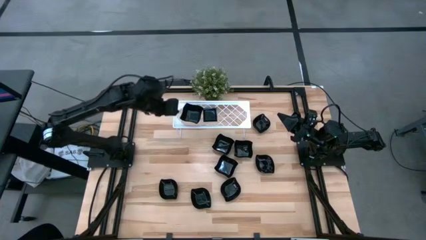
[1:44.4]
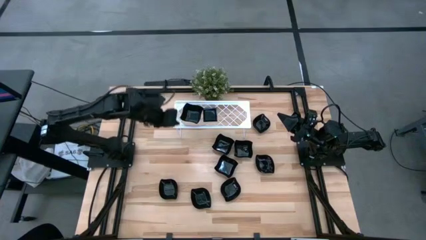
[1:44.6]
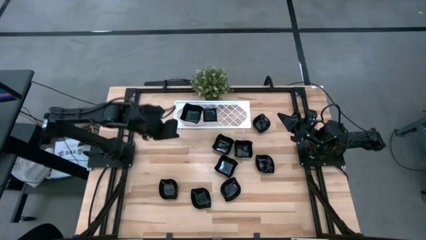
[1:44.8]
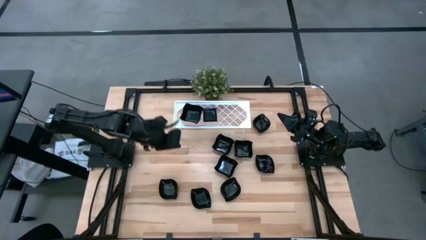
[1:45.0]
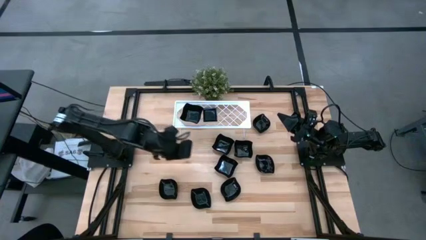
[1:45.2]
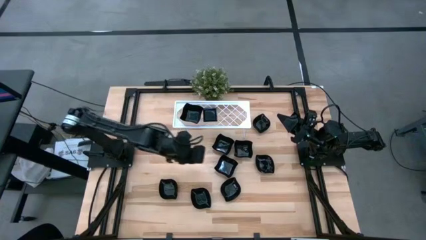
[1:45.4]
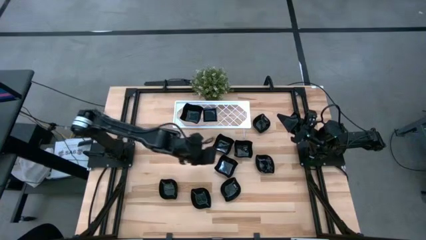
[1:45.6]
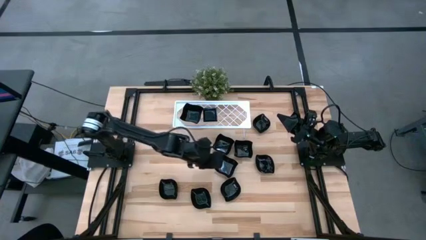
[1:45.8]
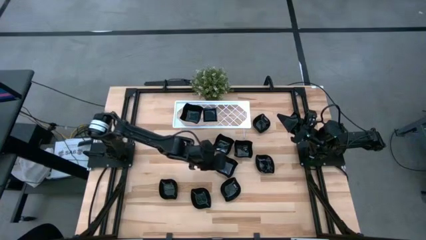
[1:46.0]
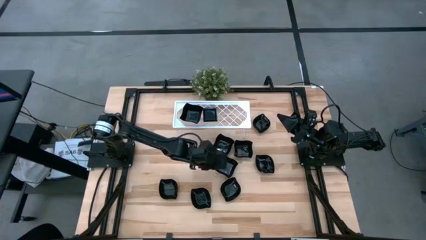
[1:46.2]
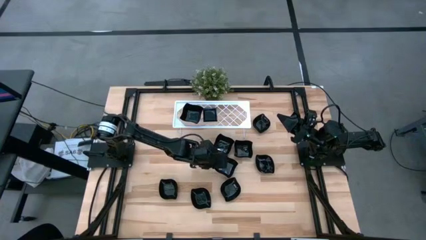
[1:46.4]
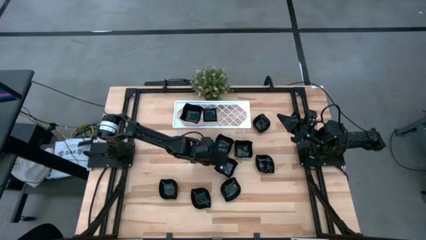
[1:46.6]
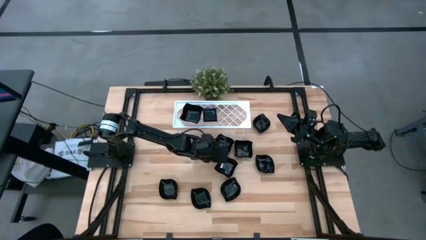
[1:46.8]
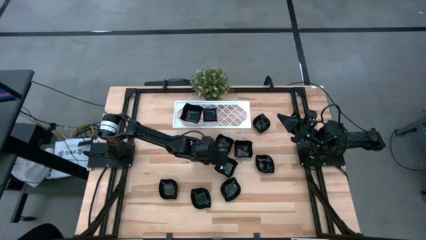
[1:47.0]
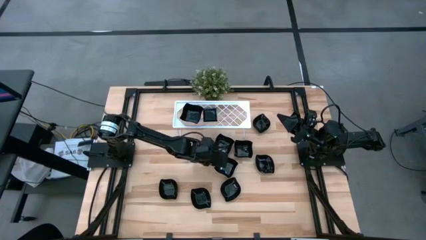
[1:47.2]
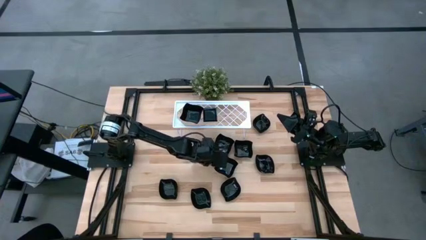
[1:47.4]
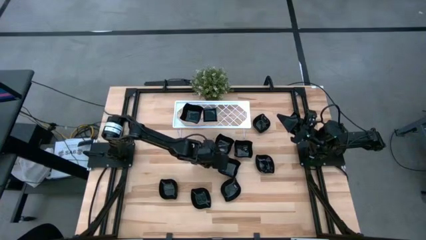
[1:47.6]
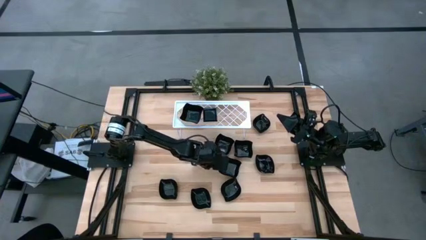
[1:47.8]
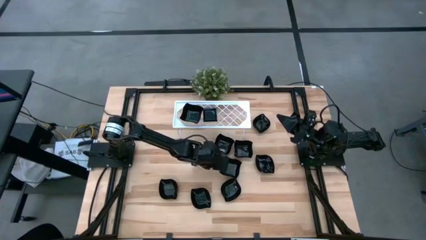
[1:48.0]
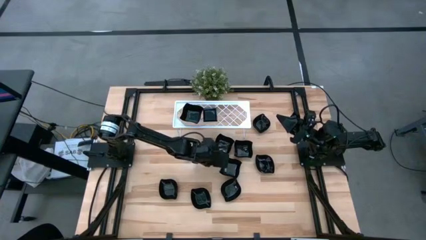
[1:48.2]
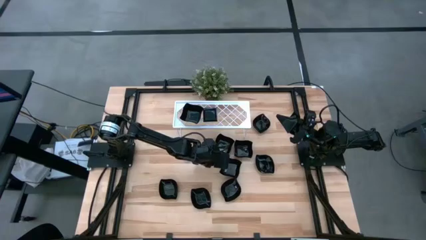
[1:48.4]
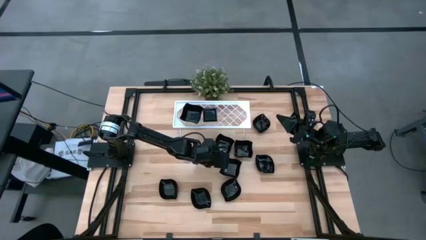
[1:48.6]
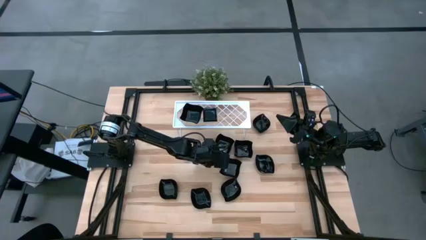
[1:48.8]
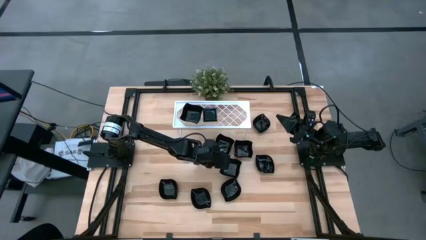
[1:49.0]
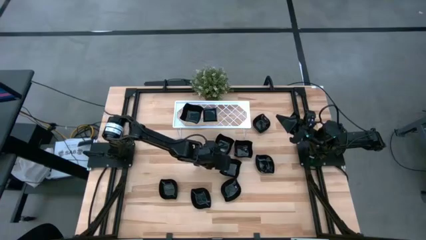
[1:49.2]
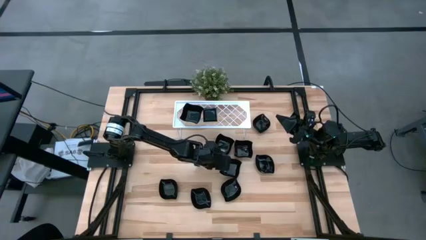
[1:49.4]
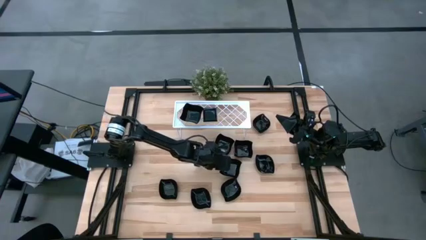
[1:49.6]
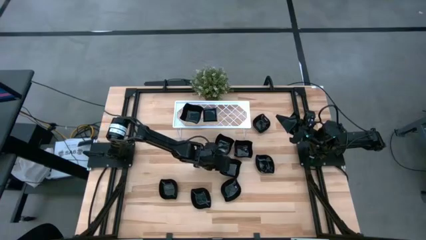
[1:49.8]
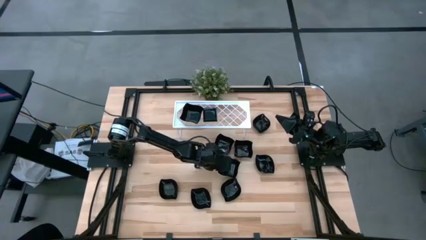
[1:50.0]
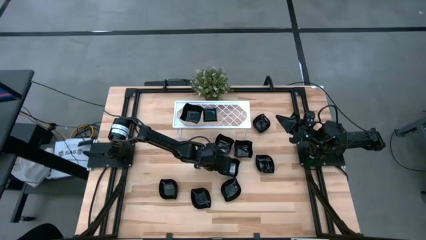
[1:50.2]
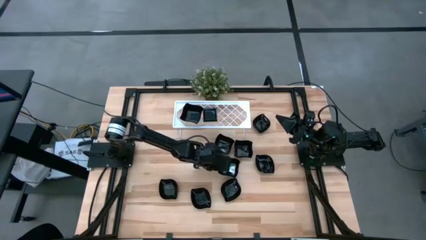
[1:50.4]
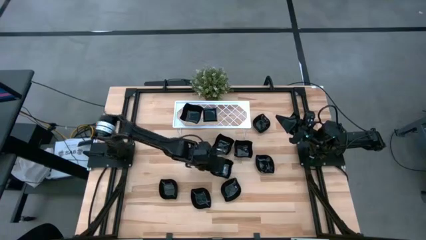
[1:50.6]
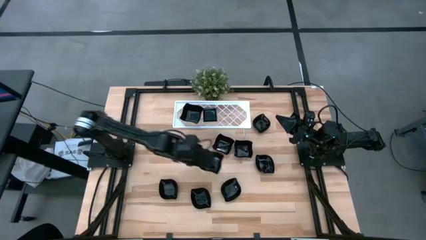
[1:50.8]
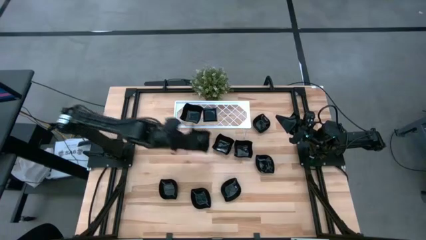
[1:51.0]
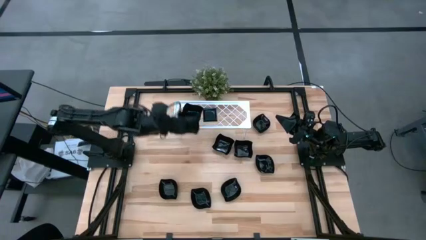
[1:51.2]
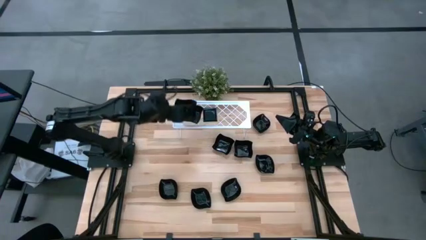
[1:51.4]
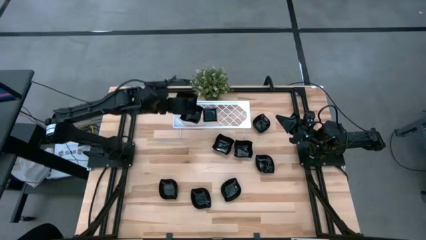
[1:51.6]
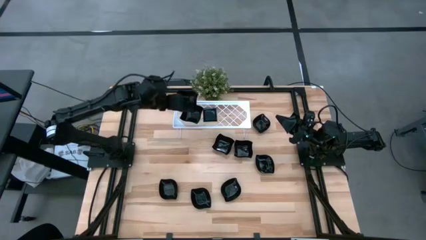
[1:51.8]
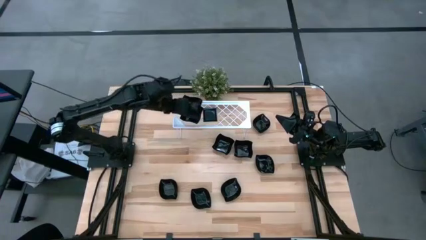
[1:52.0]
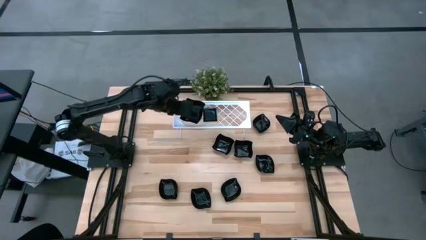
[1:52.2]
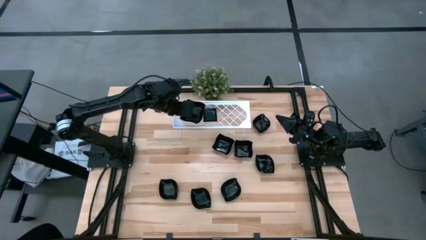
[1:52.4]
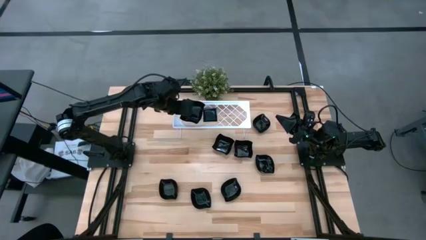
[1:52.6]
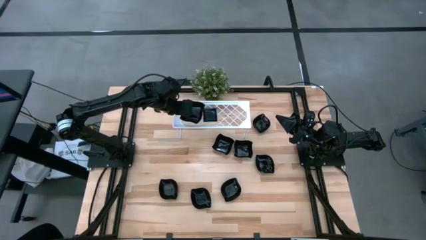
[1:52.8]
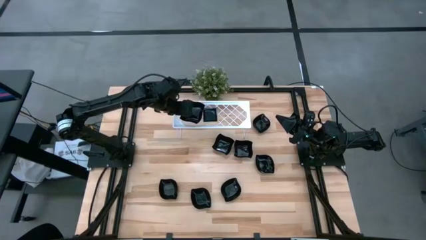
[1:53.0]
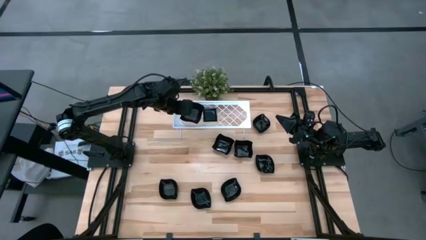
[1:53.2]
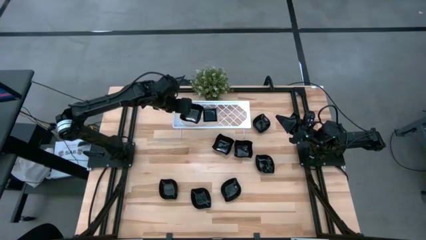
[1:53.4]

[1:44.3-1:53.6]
Task: Pick & Place Mini shaped plates
Stack the bottom distorted square plate on top of the stacked distorted square plate on the shelf
